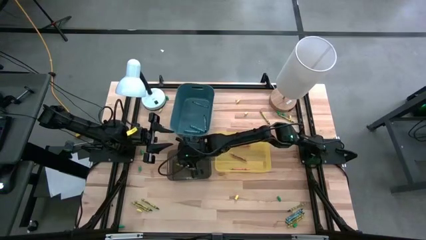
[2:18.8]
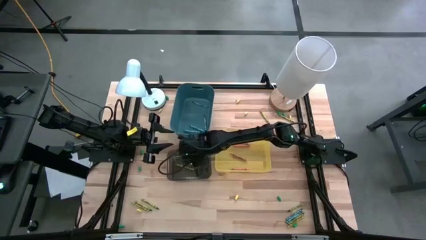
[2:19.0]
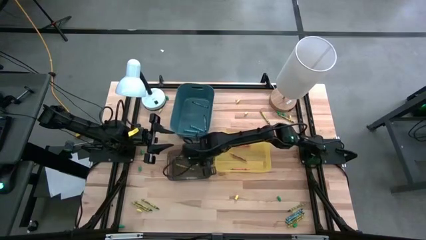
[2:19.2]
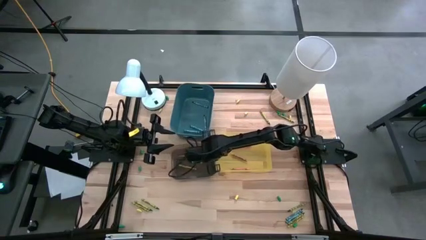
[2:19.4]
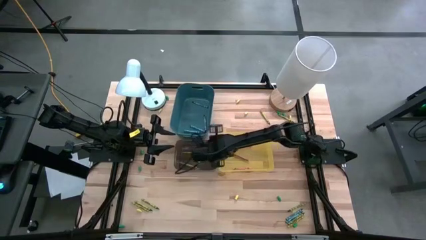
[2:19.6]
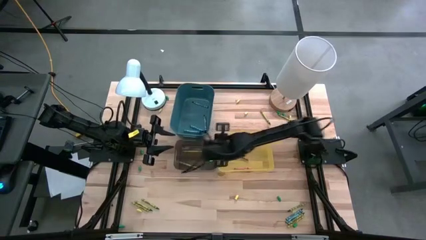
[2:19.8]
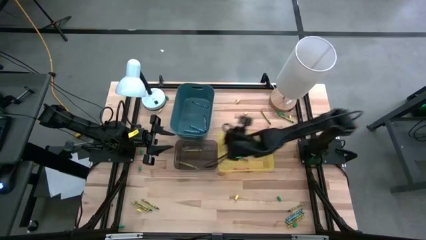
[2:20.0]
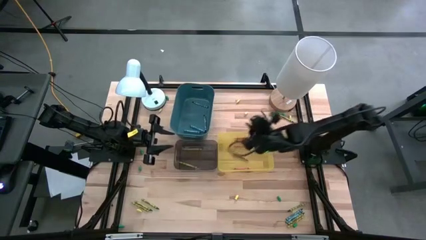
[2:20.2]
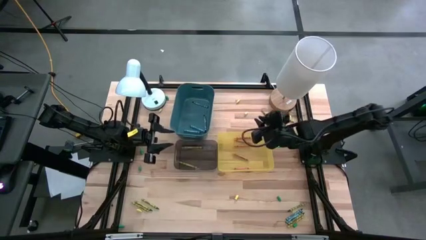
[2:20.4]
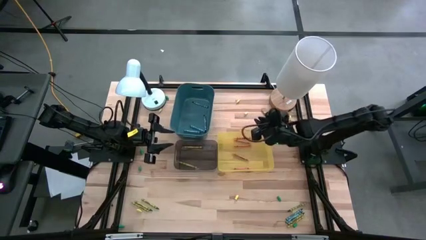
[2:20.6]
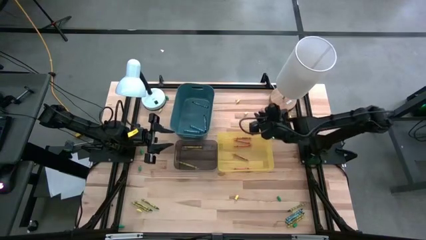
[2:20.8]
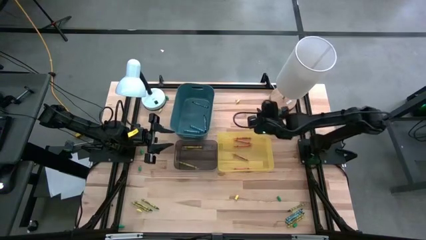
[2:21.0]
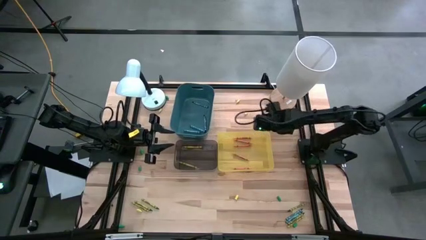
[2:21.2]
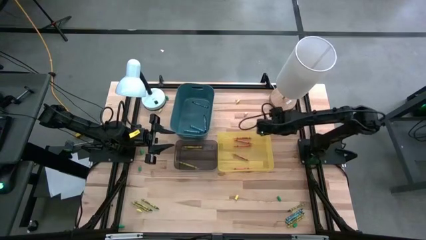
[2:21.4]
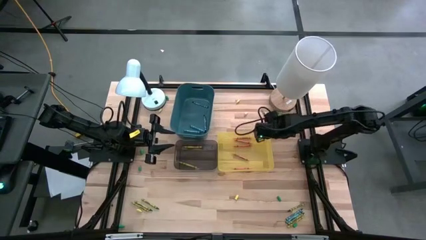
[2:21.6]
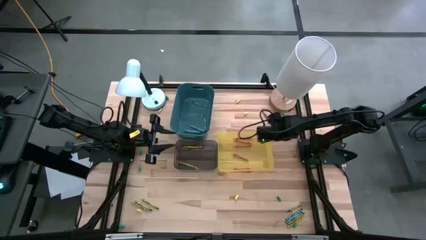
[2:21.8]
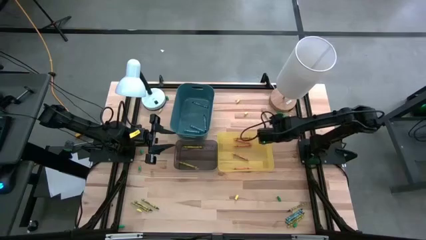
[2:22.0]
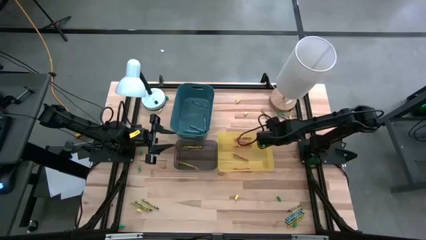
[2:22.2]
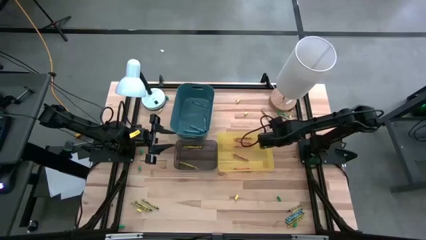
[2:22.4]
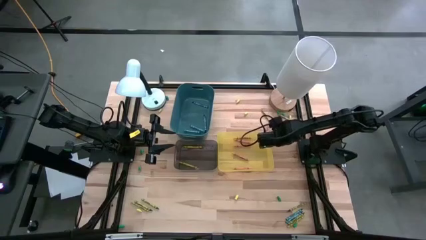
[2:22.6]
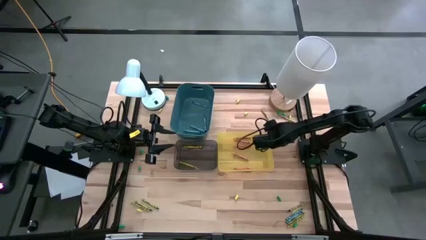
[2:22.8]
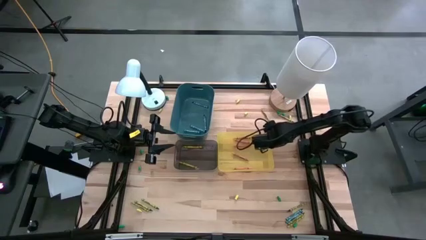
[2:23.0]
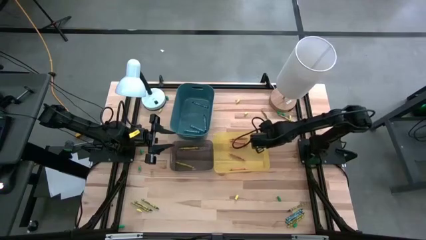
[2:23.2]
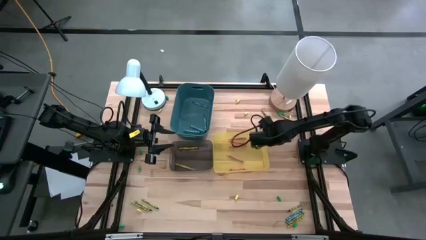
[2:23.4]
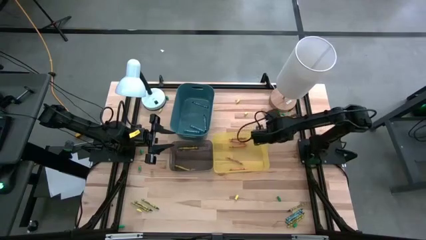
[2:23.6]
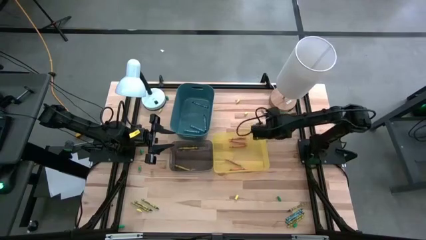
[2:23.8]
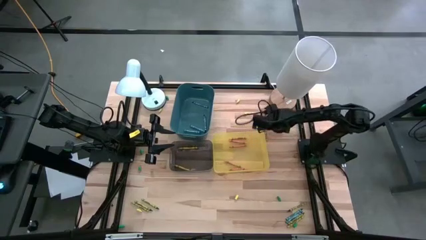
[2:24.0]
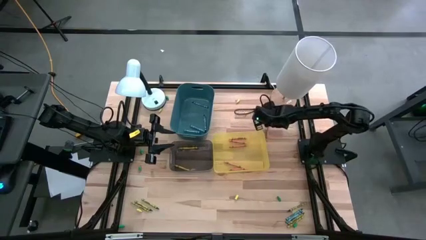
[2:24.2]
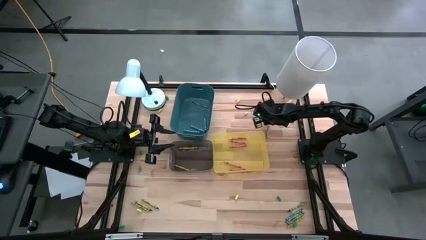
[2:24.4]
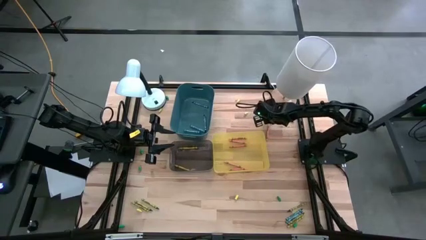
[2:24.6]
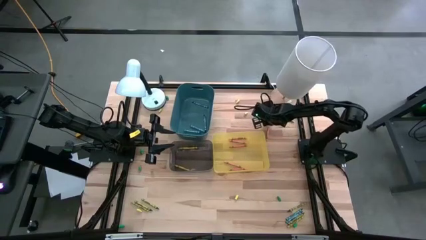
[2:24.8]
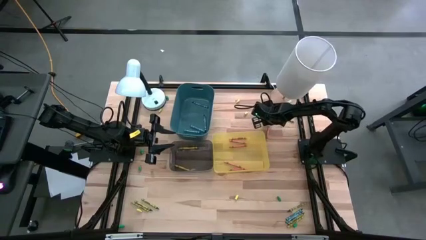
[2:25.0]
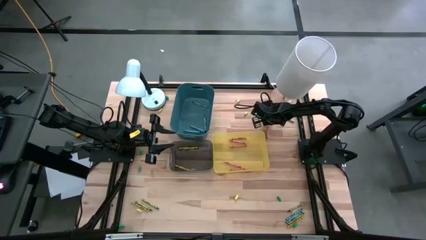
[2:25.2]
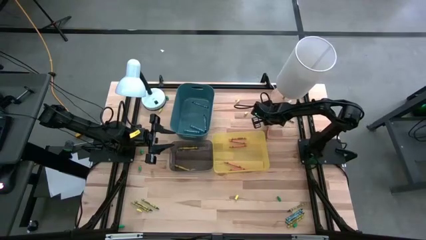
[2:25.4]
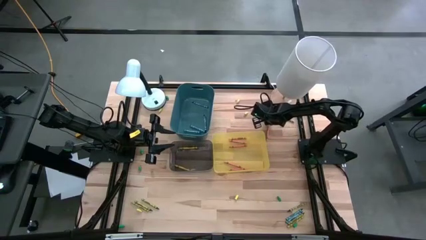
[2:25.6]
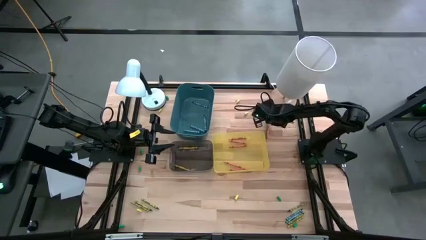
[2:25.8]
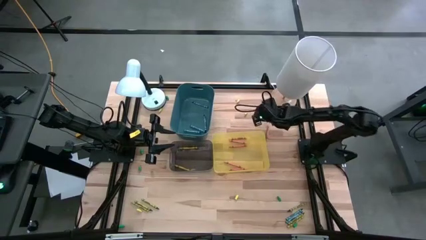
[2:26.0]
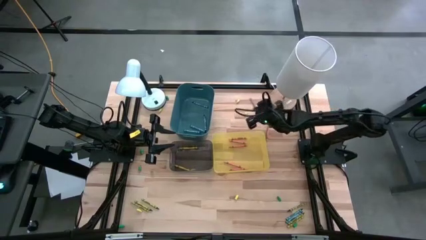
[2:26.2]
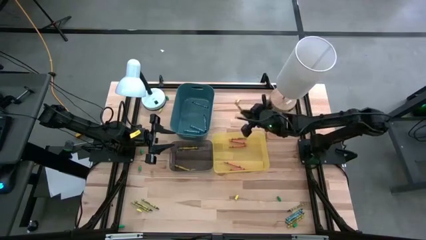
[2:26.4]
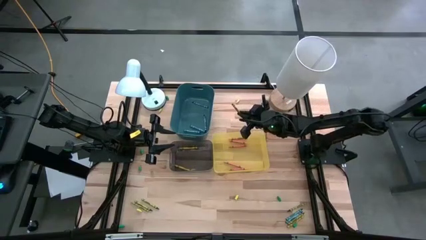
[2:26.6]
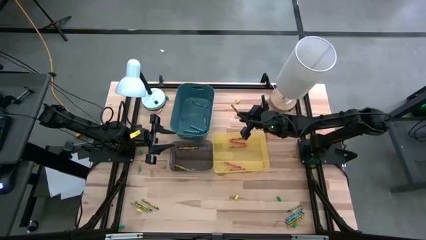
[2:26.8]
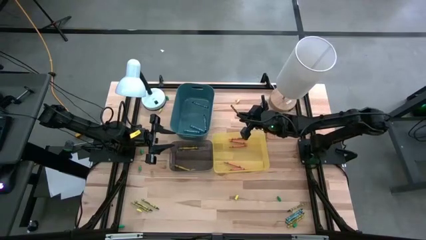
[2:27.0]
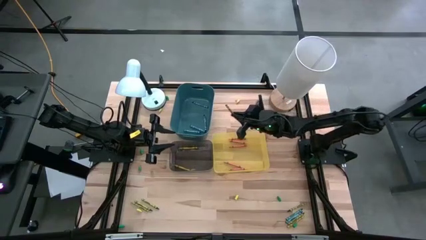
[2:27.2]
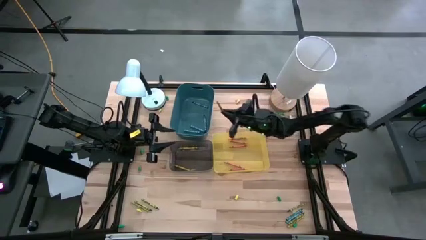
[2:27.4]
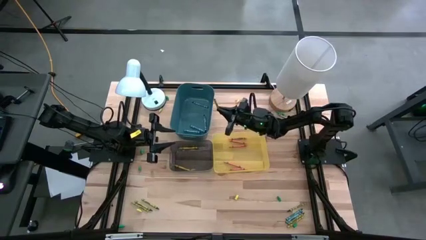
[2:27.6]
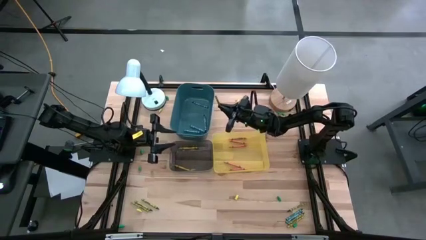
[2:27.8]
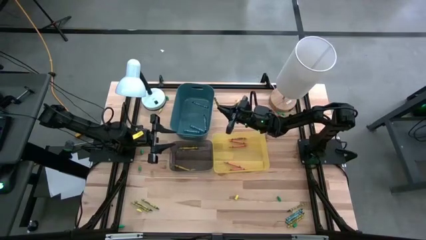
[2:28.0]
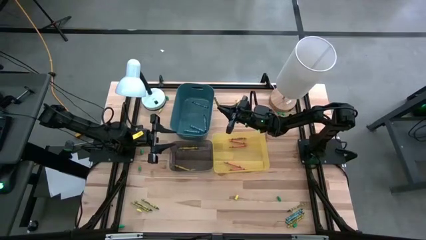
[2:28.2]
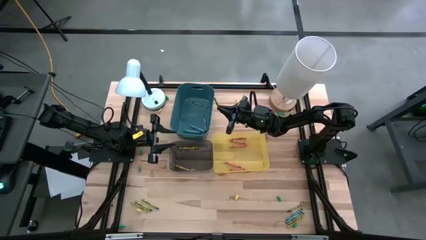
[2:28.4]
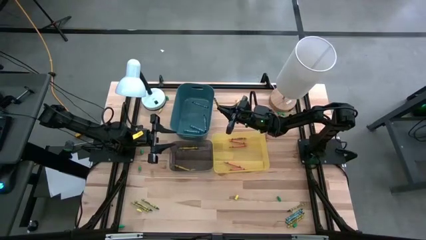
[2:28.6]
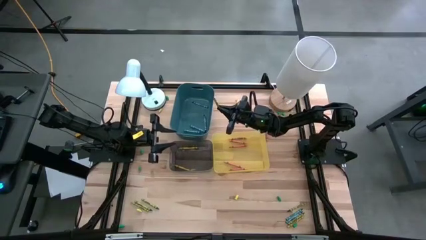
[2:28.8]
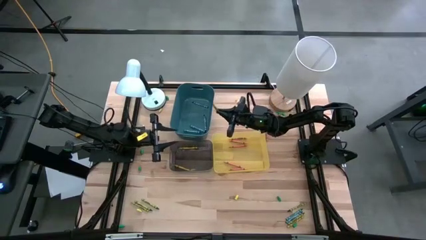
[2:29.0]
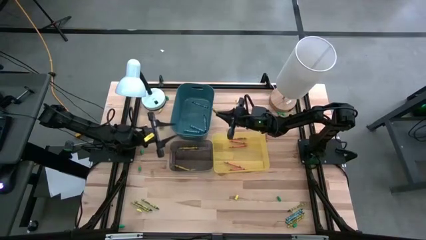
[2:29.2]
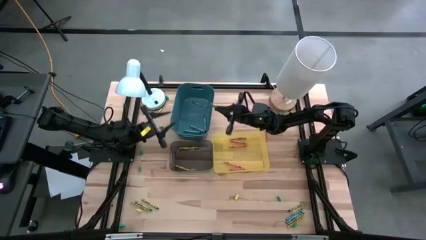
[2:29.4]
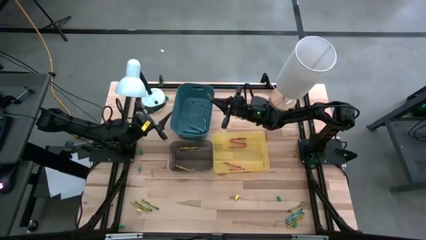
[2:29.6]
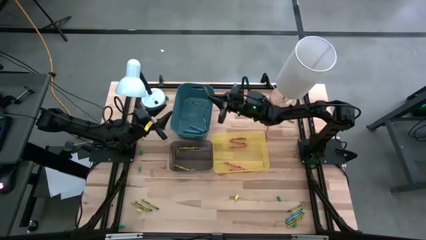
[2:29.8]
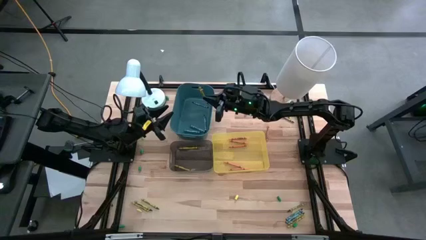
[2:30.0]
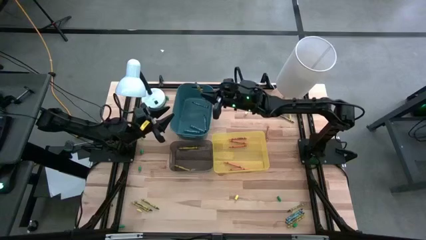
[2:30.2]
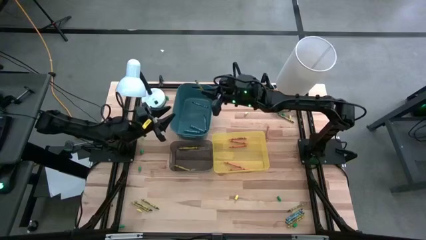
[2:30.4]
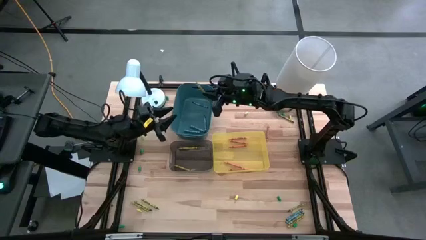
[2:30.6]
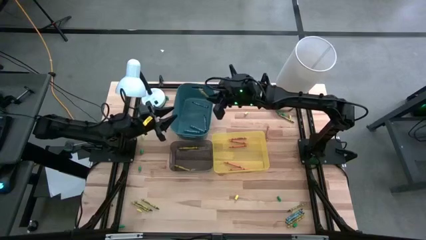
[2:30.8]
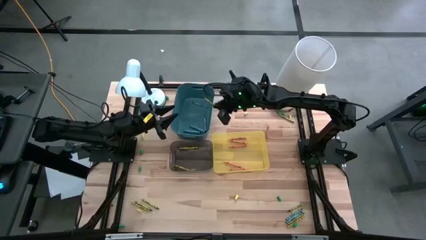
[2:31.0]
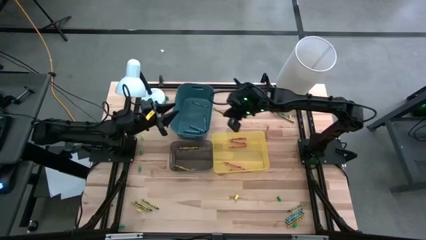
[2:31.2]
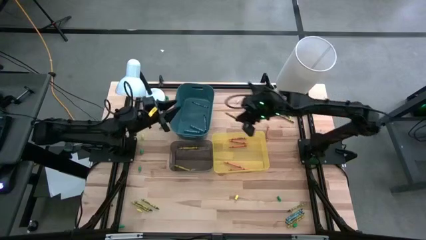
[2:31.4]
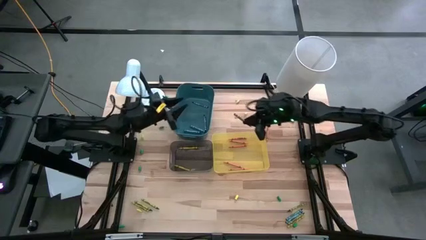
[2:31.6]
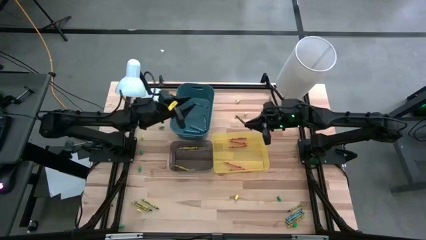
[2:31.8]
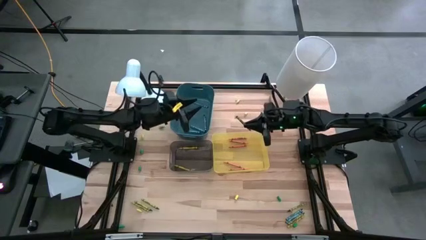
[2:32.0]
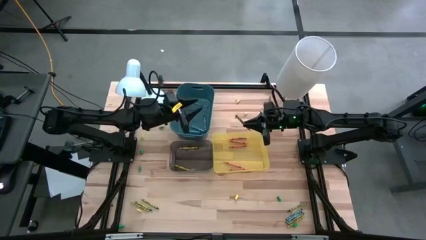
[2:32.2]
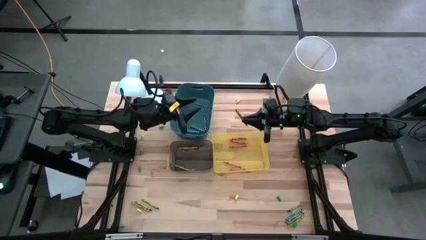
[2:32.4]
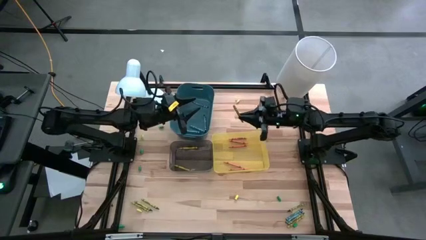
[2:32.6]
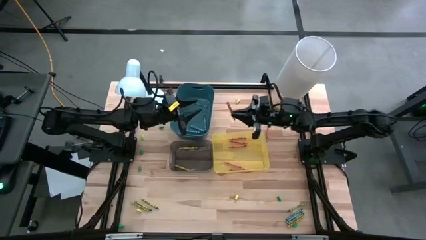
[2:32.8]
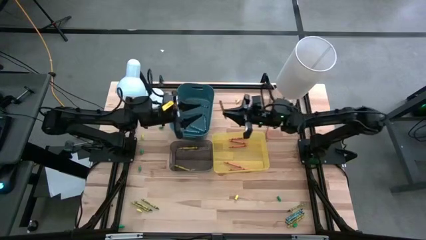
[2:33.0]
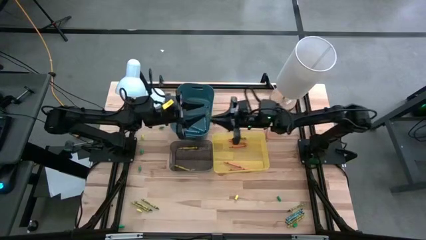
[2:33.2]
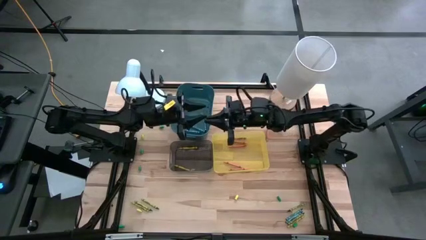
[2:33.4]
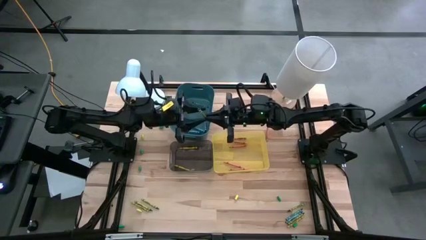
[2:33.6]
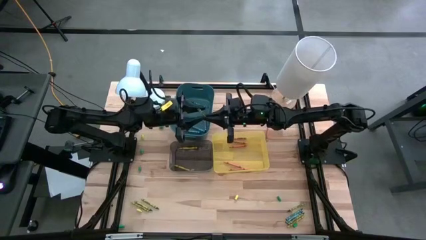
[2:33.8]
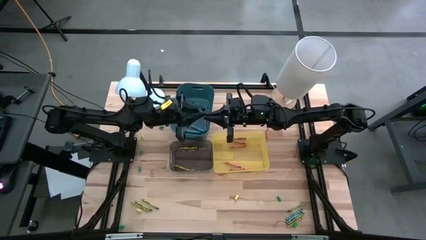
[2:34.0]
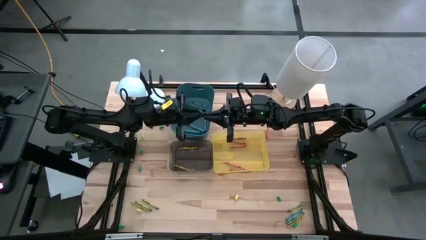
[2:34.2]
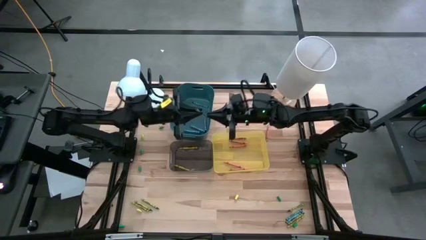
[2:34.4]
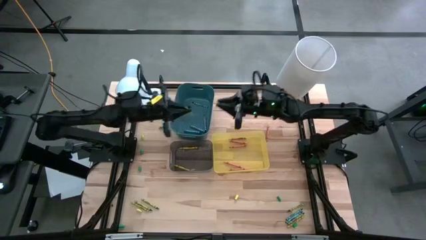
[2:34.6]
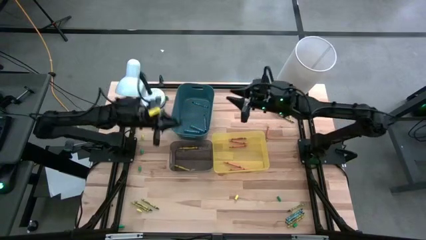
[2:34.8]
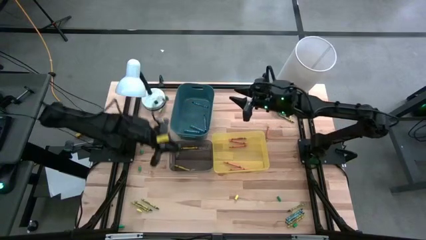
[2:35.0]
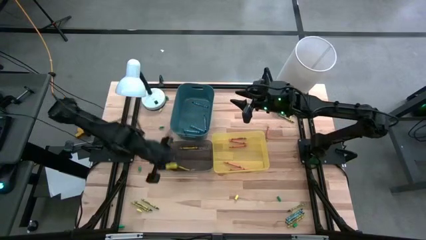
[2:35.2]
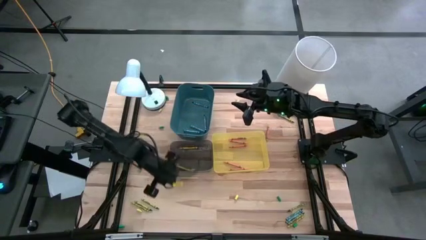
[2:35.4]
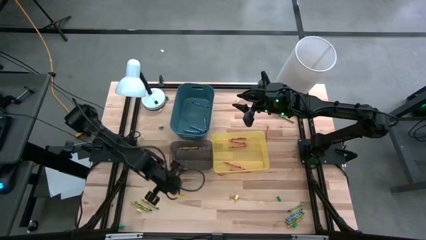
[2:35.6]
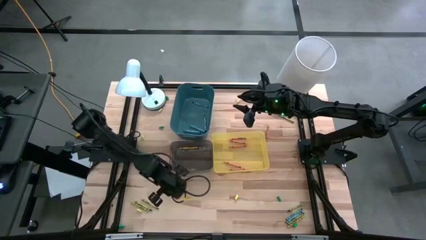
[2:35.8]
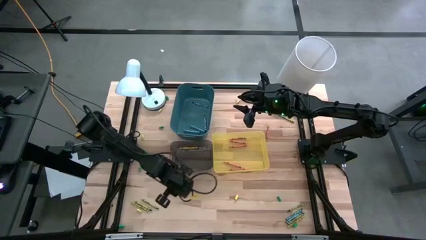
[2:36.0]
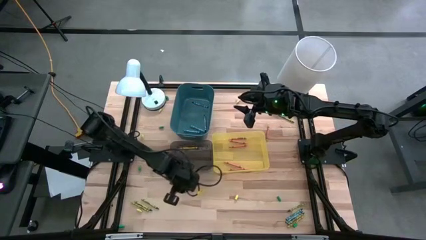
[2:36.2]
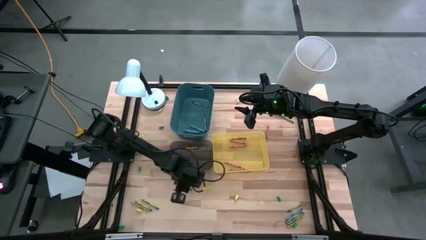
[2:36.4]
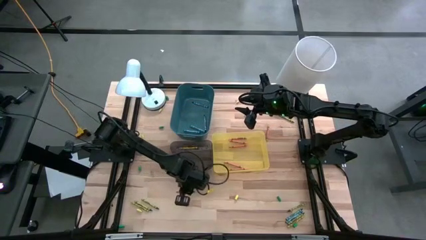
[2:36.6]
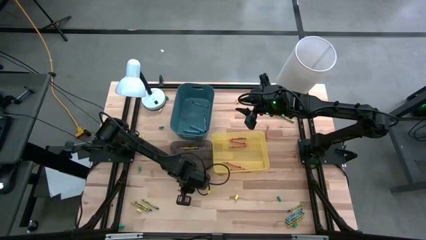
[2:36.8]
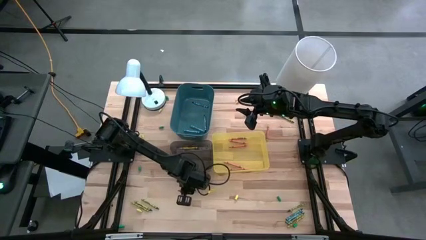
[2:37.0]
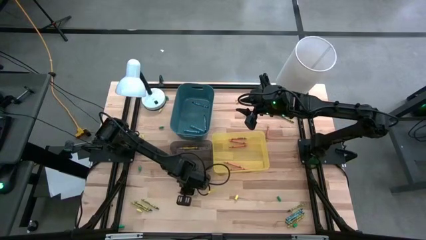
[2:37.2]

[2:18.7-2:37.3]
Task: Sort crayons
Move the green crayon to the bottom left of the table
